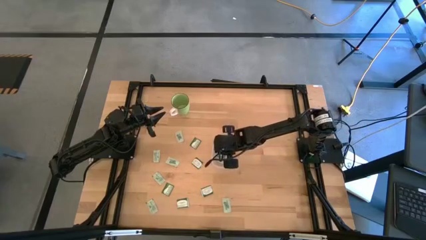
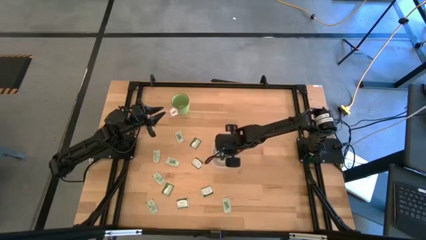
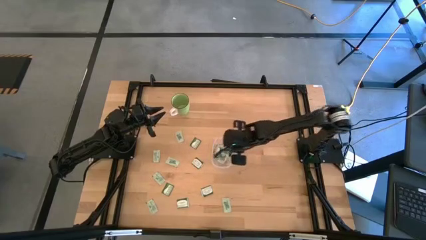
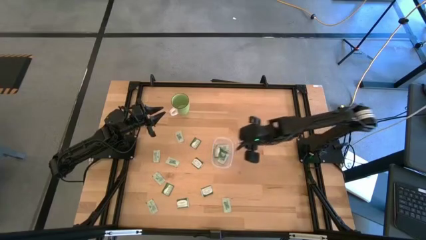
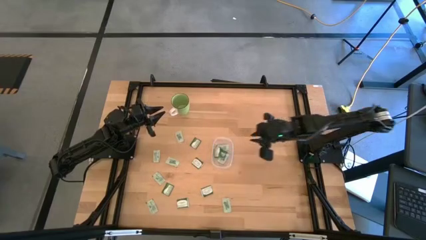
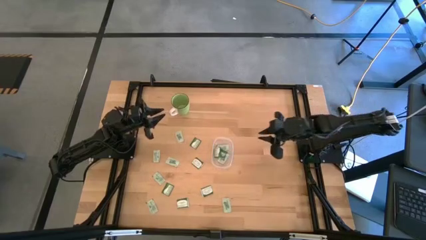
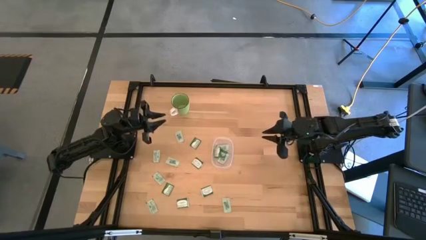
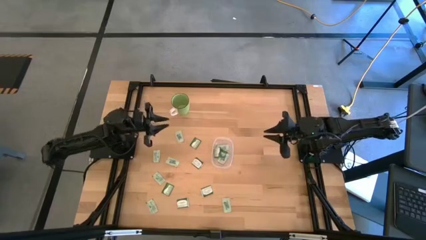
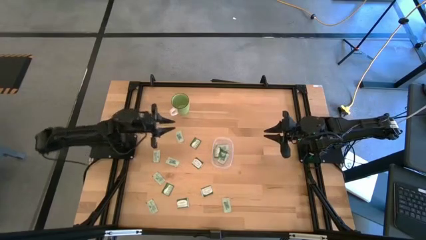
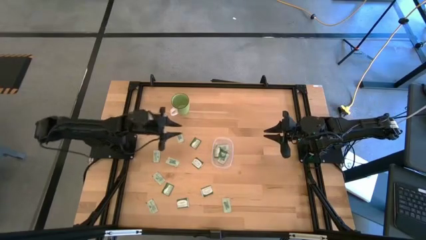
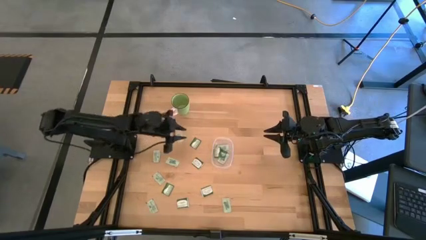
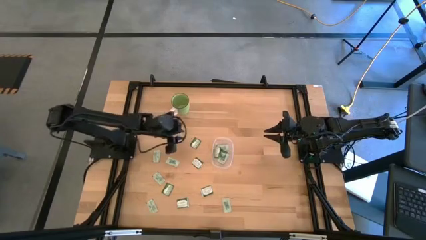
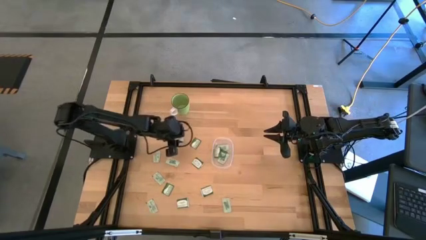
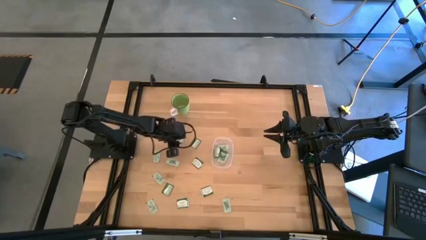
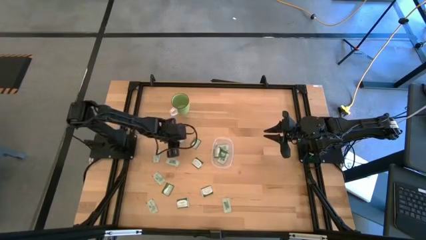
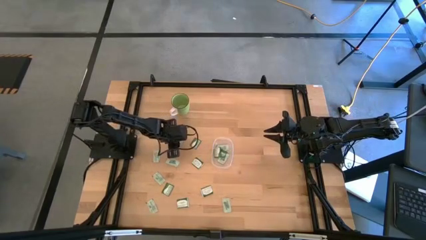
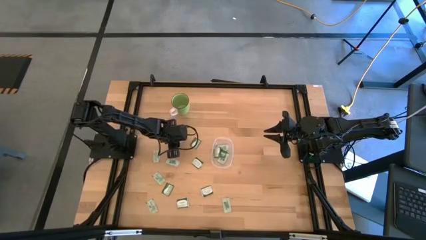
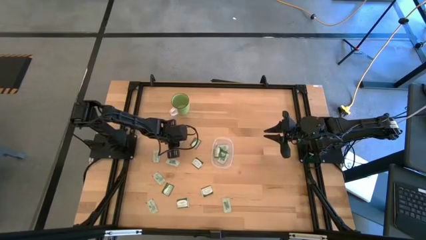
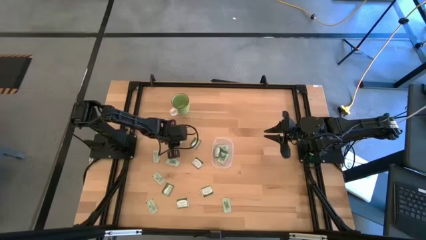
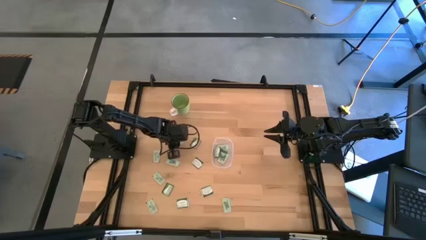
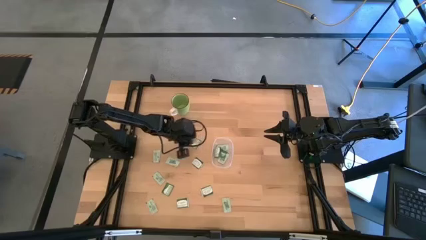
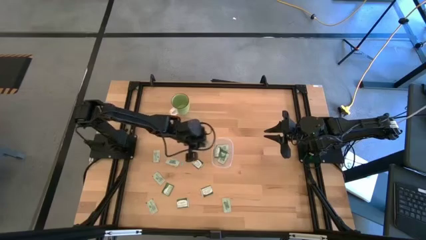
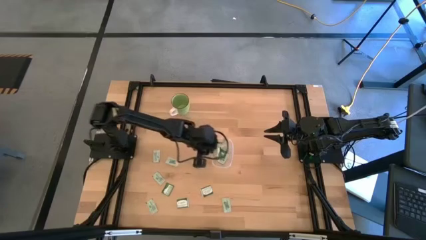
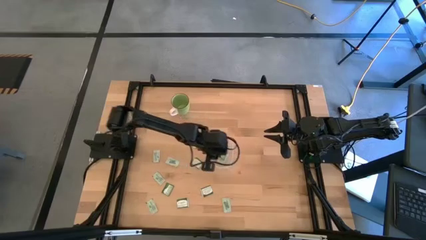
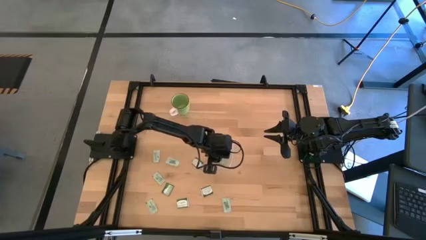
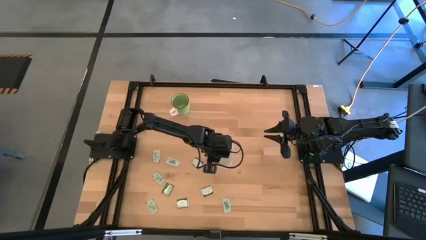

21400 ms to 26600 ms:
Task: Pick and place items into bin
Put the stevia packet into the transparent bin

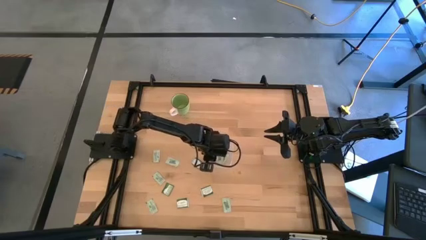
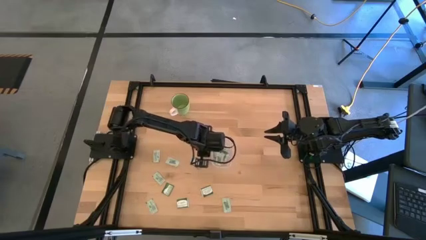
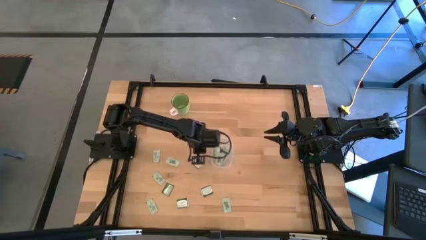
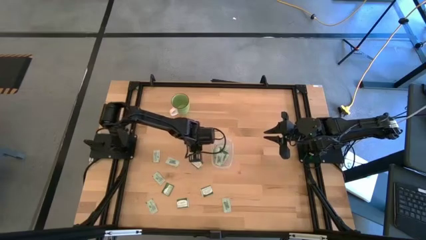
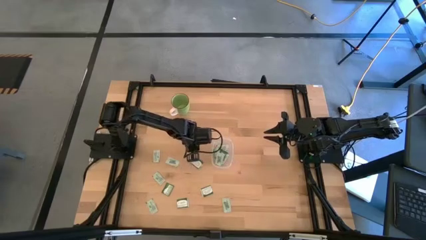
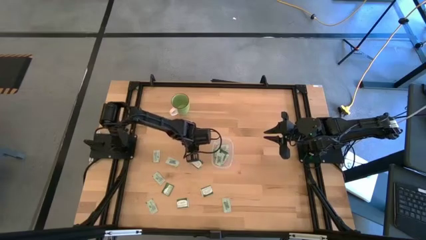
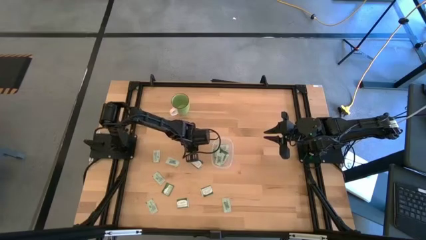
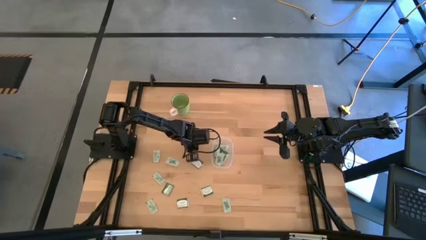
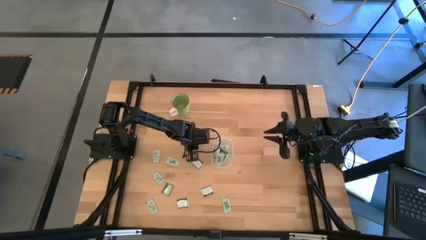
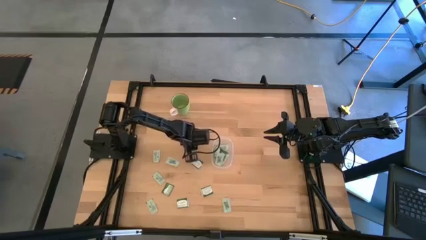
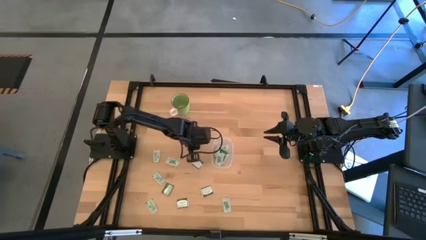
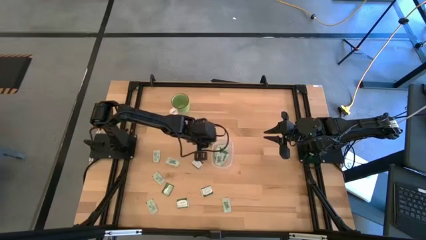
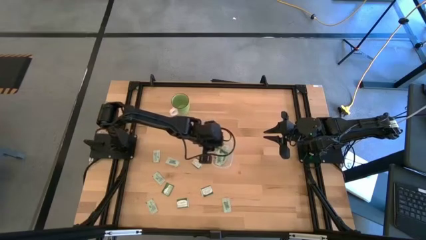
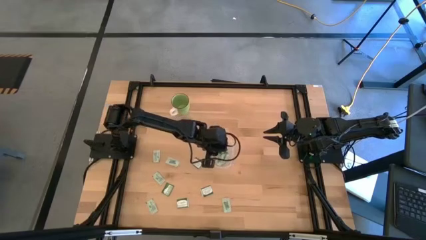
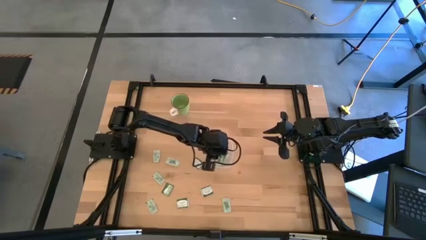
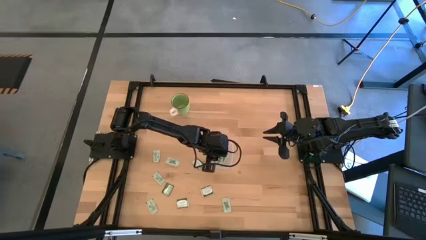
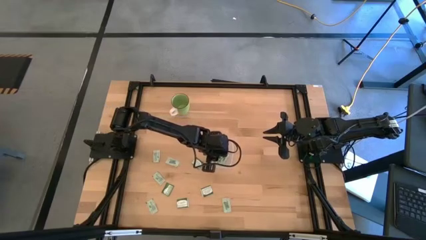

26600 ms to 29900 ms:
Put the stevia packet into the transparent bin

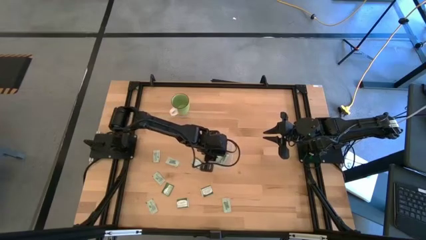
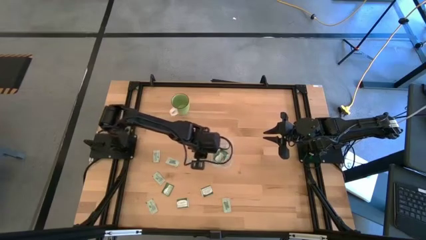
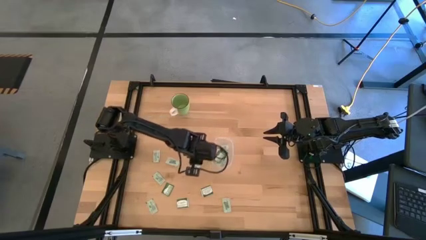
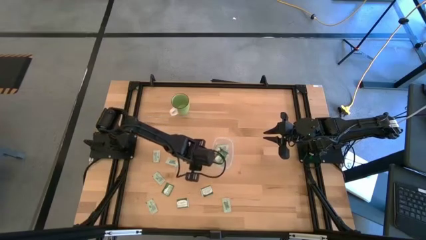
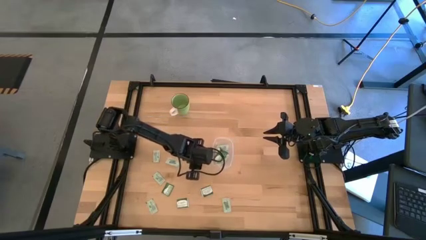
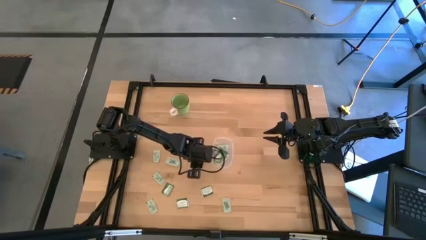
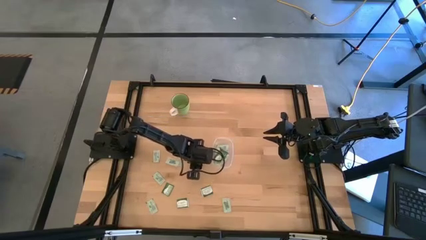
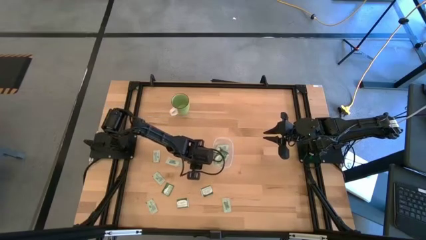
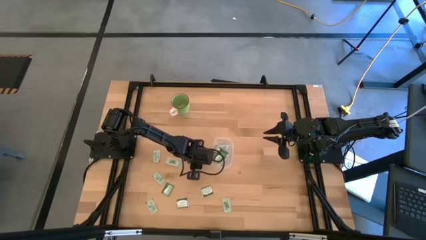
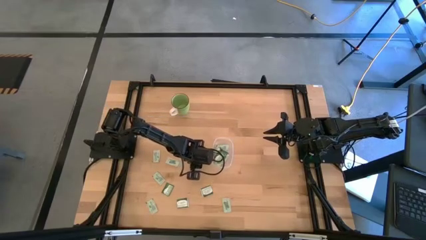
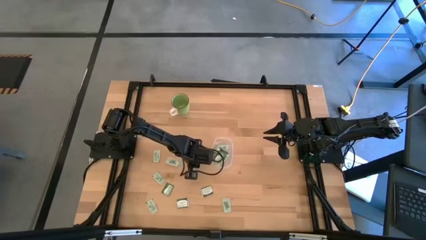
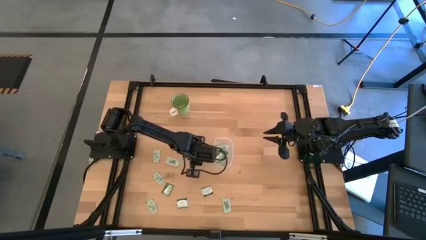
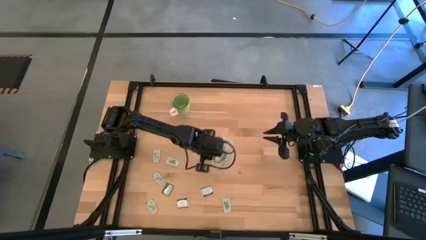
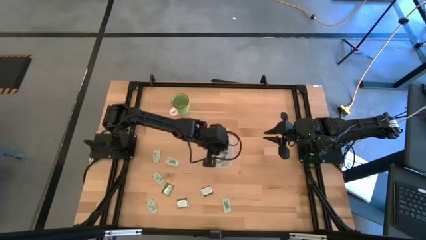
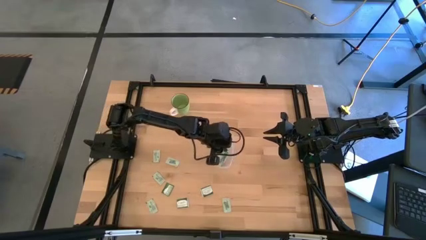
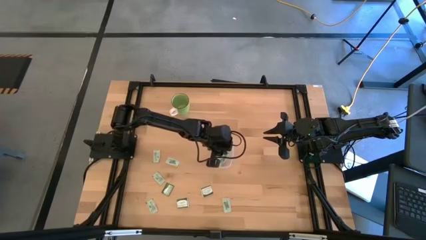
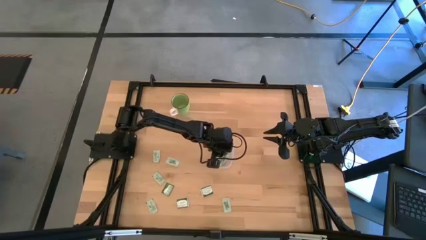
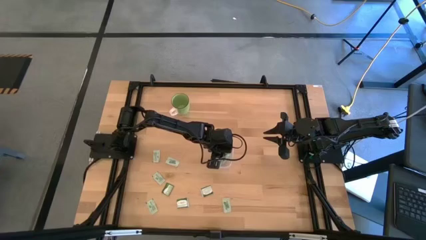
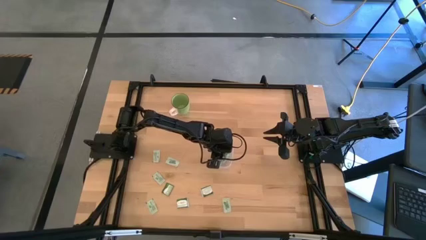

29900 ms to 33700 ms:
Put the stevia packet into the transparent bin

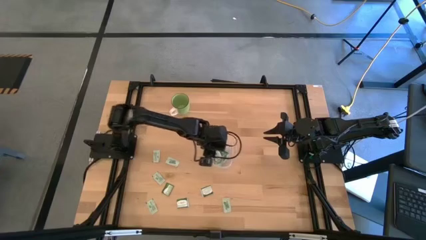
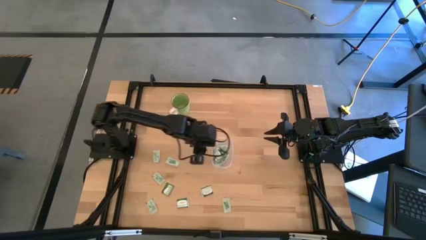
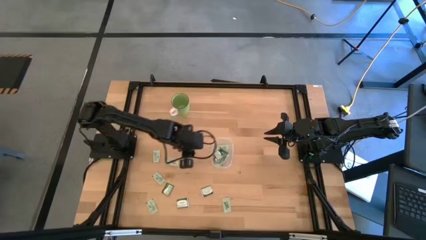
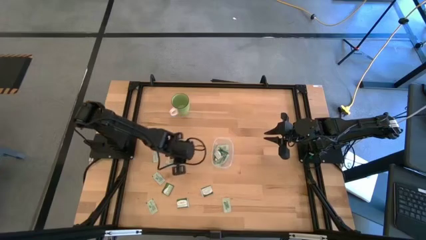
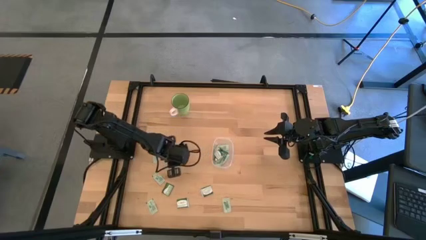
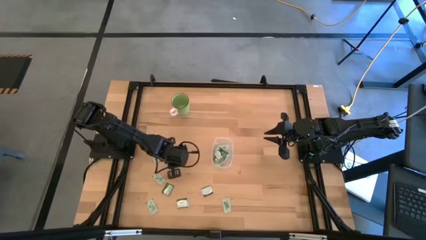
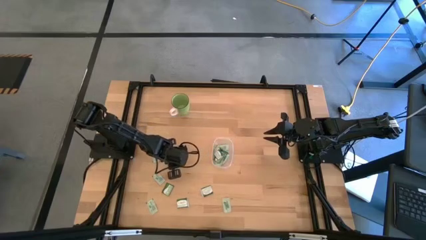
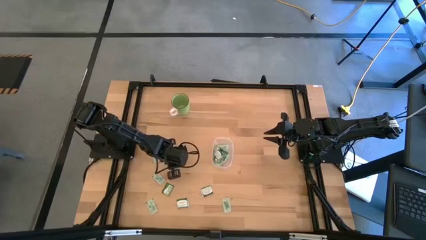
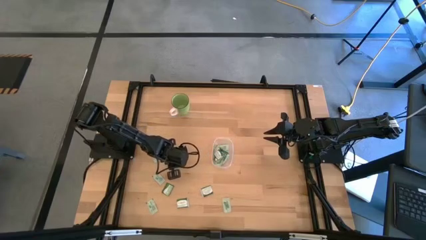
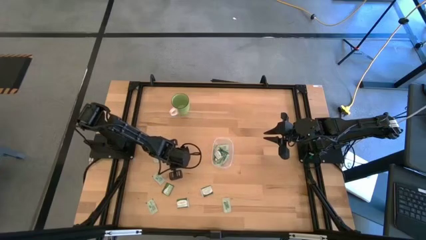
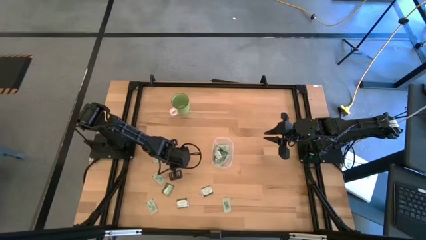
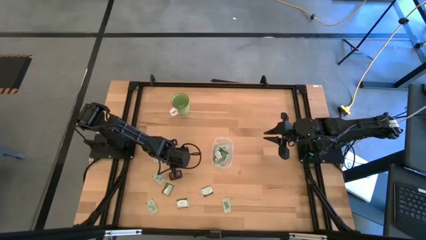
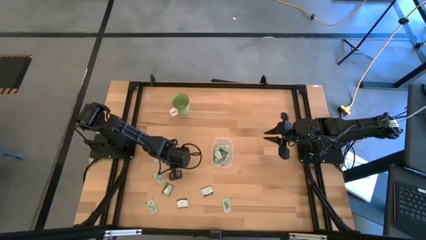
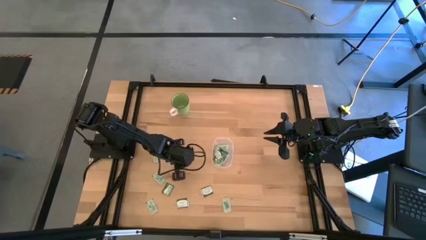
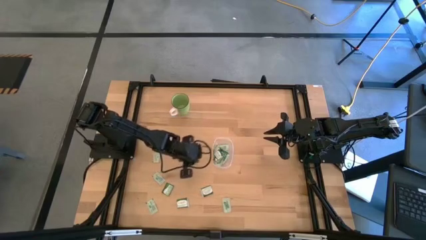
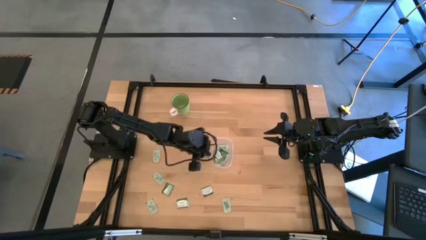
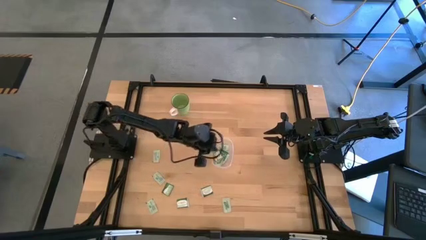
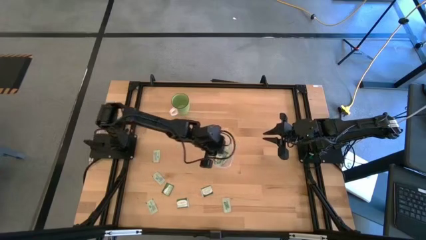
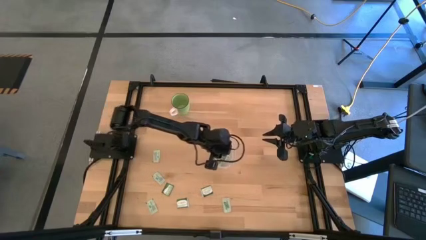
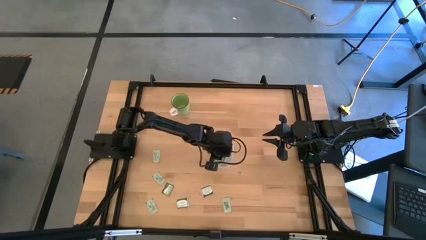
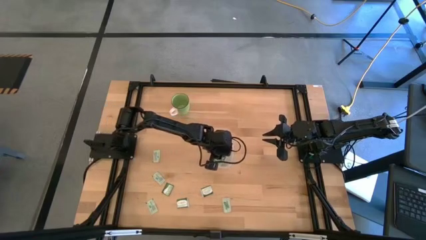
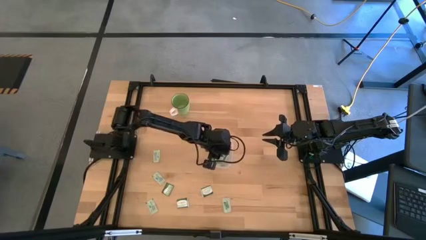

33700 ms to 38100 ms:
Put the stevia packet into the transparent bin
